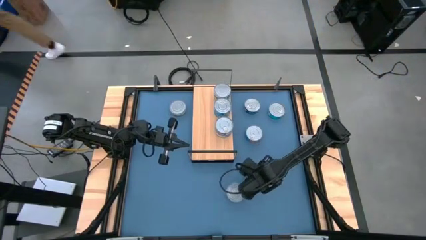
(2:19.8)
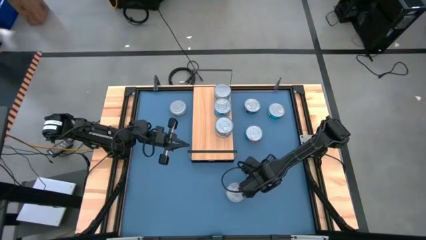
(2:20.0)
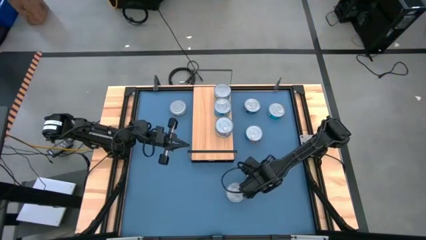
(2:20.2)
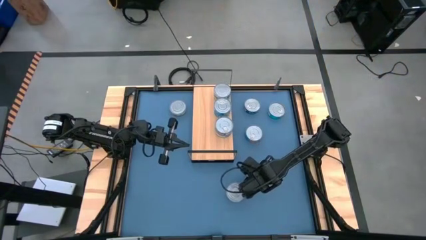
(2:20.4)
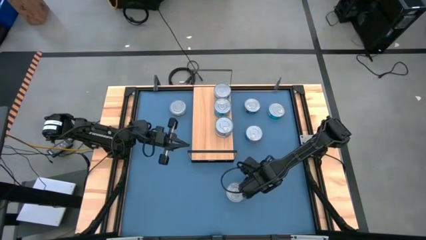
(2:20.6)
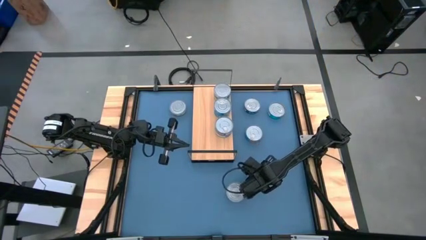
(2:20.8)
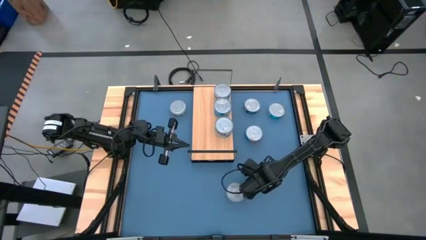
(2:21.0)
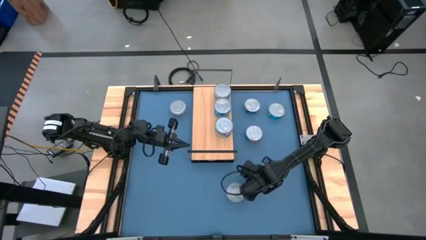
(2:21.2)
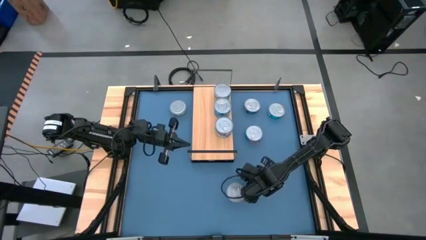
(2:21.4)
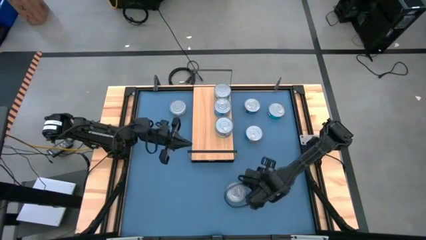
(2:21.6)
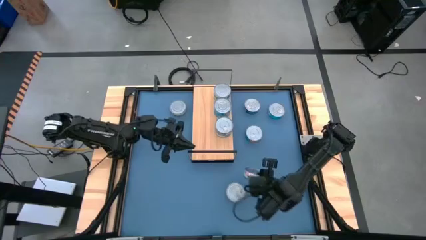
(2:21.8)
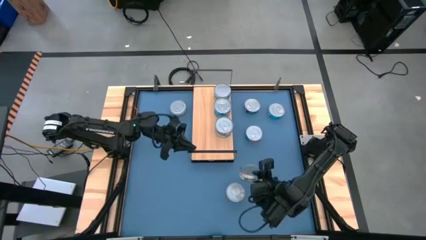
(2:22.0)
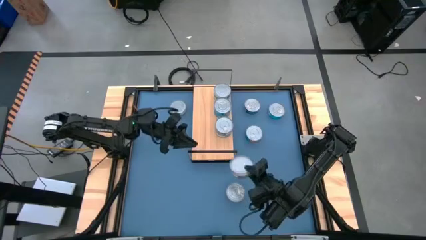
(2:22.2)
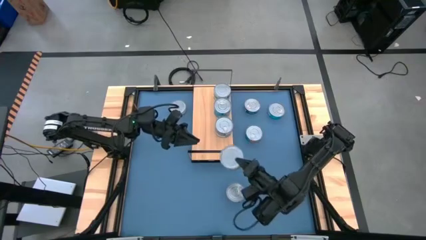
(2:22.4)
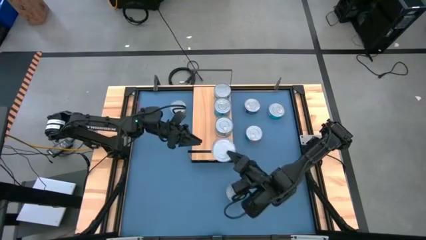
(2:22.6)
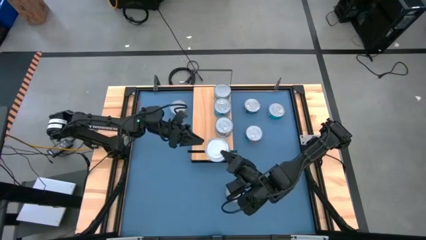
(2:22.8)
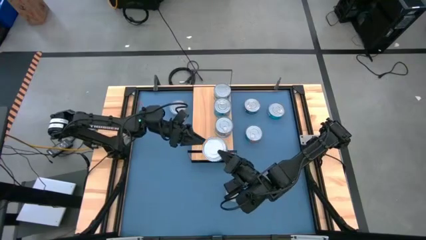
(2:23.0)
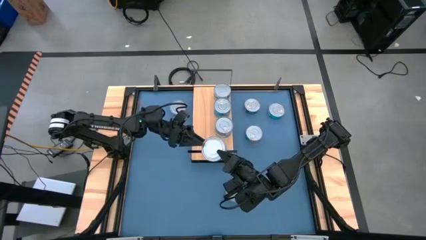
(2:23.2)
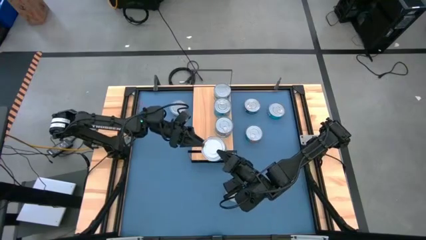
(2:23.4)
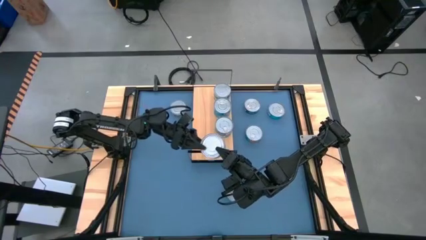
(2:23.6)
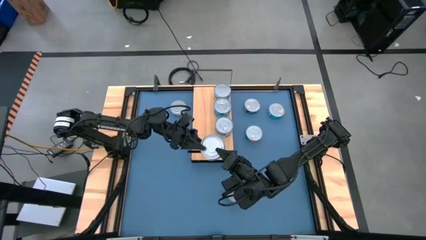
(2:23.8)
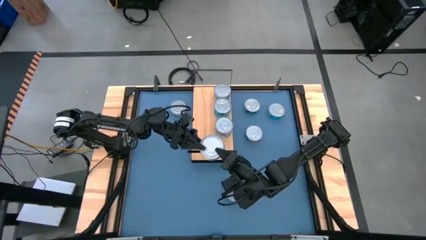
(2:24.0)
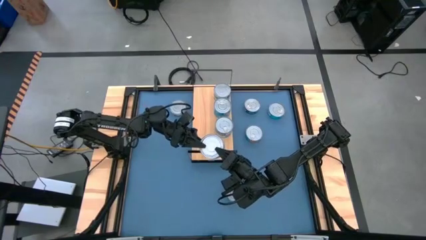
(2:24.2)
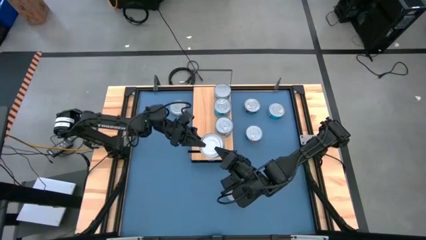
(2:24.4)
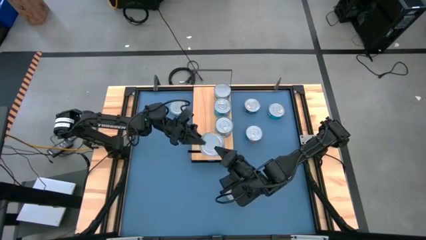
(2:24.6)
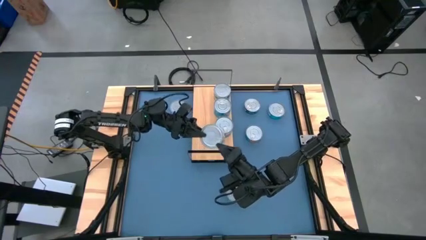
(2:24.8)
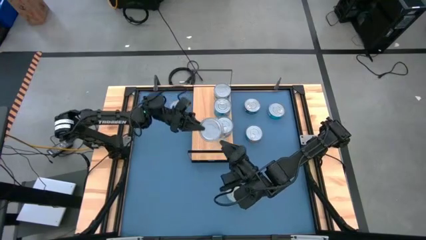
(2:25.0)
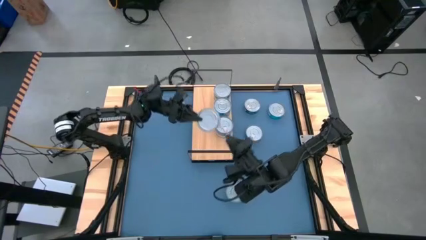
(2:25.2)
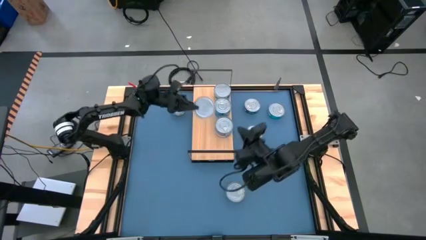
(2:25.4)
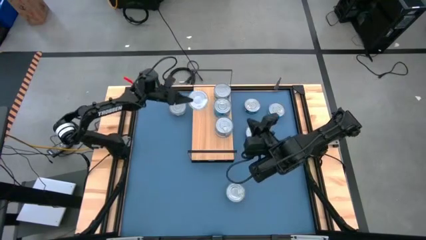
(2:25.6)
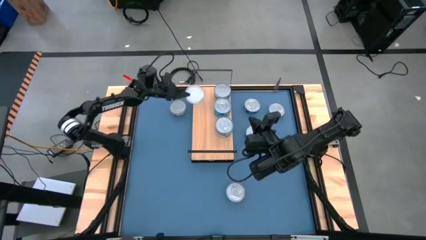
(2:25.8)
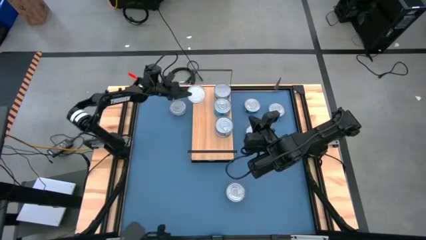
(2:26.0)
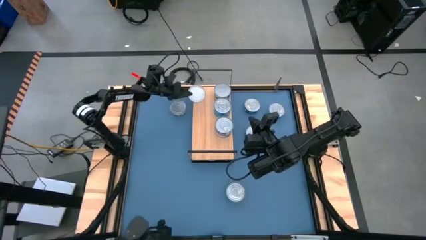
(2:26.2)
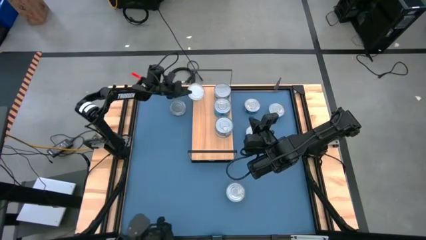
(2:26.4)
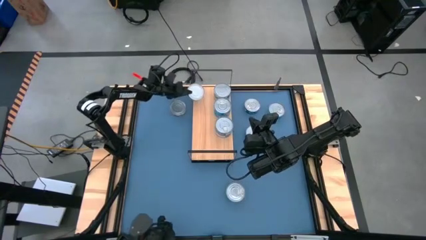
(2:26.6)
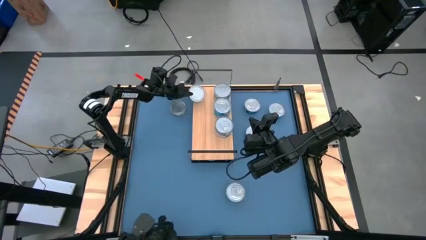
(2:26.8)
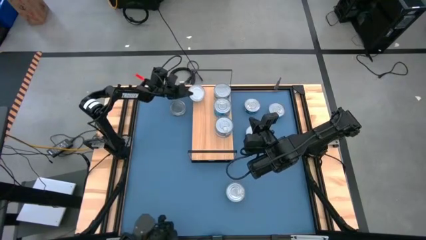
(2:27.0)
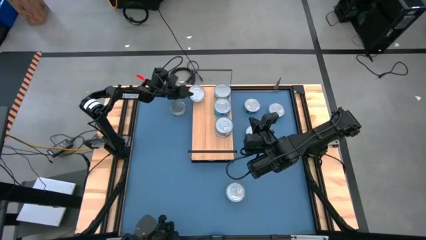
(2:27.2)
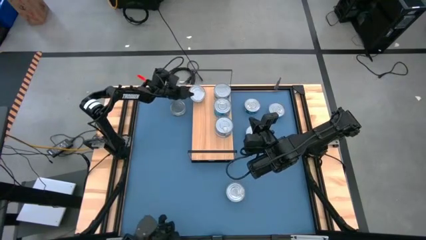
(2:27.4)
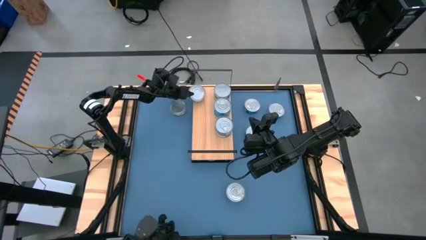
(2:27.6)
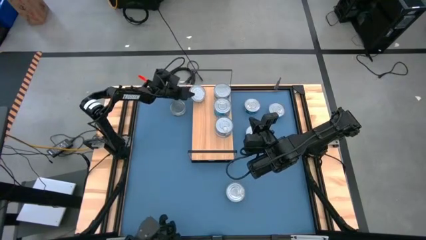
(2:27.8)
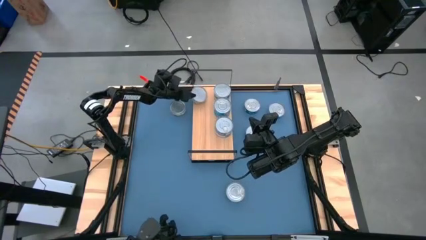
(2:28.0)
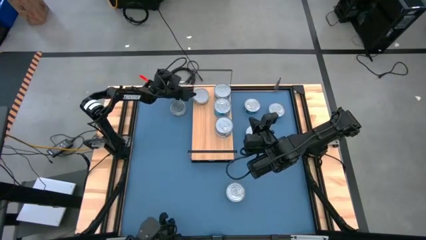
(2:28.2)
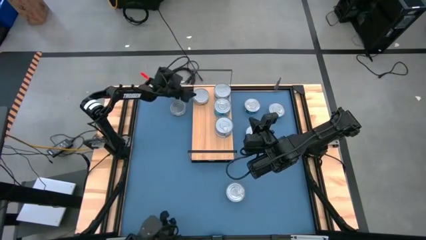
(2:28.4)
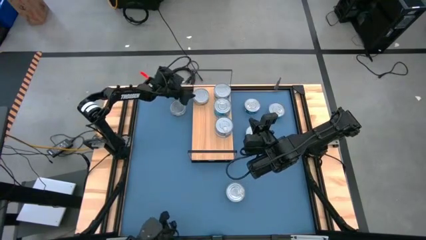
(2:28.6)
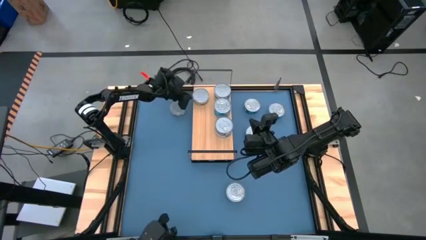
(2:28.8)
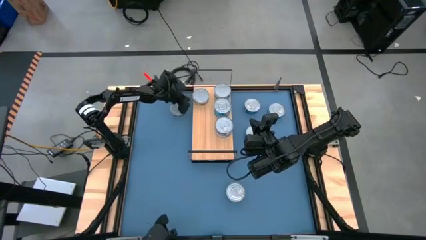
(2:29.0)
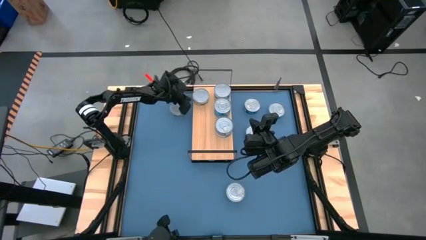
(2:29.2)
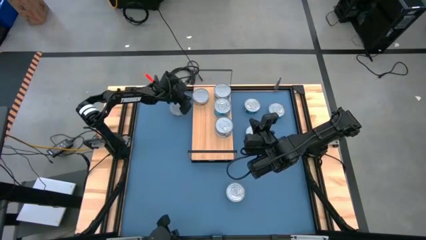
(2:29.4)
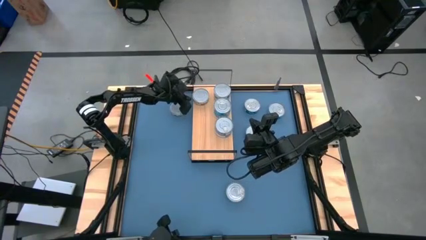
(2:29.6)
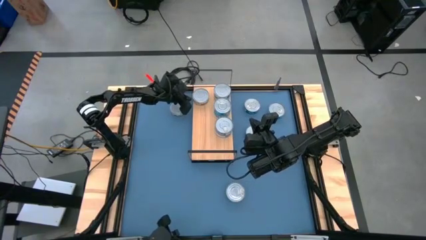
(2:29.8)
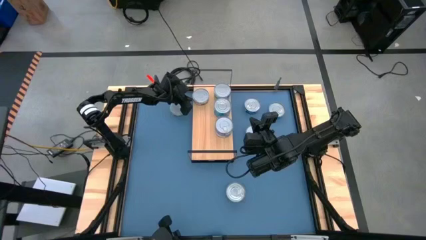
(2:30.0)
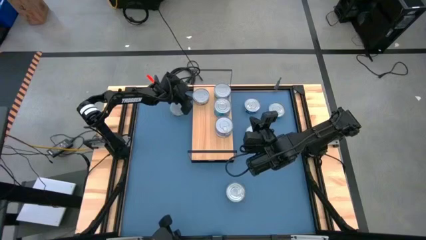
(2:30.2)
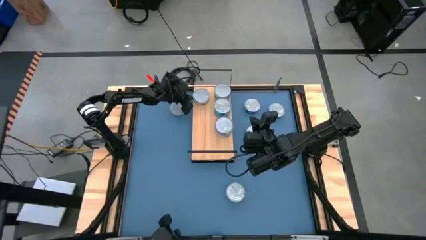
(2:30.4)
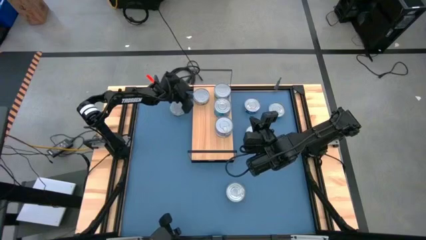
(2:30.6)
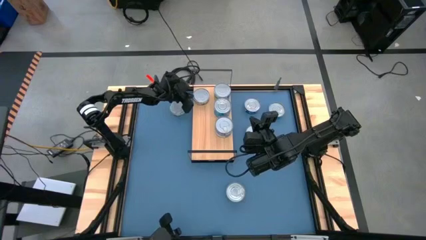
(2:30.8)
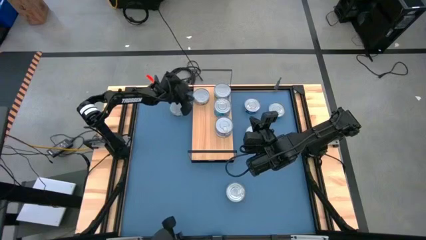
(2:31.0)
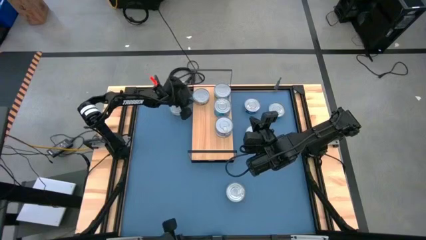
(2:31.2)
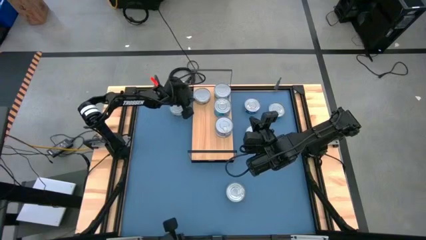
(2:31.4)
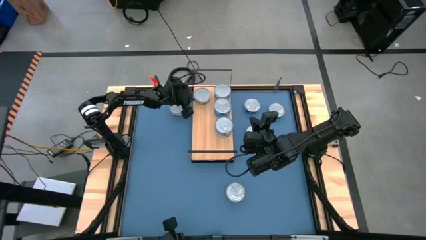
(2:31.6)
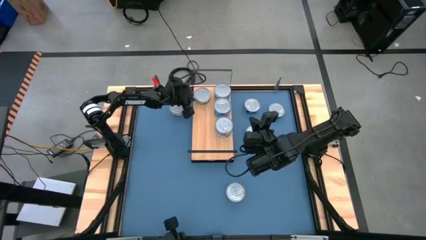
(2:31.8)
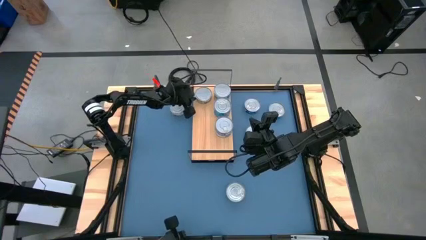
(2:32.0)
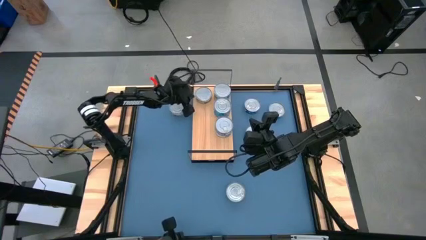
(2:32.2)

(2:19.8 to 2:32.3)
Task: Stack canned seafood by type on shelf
Put the green tuna can on the shelf aligned with the other green tuna can

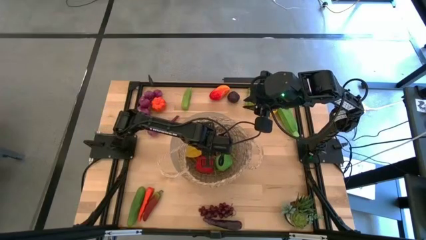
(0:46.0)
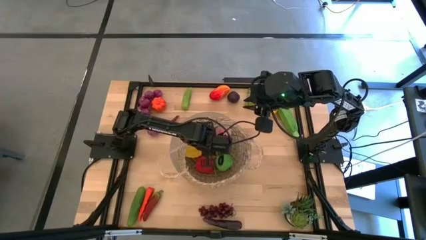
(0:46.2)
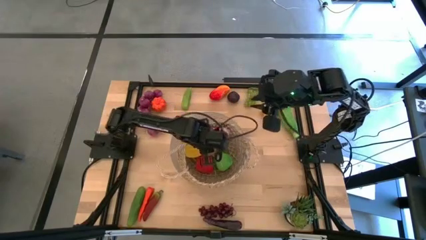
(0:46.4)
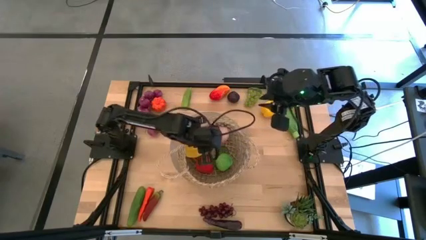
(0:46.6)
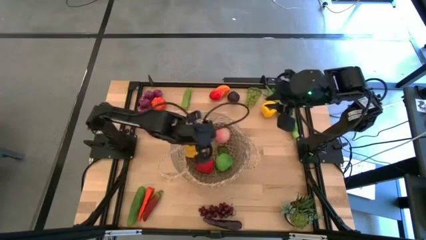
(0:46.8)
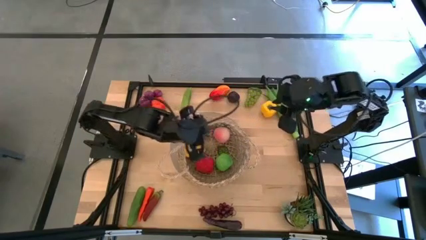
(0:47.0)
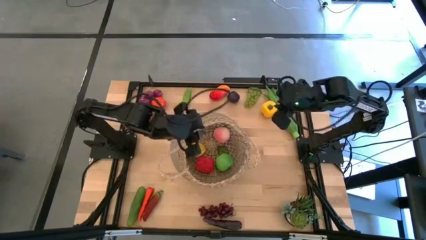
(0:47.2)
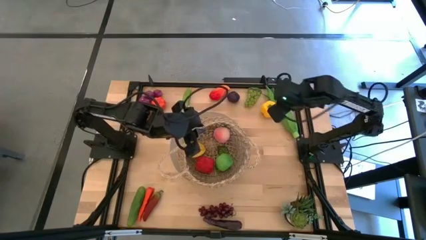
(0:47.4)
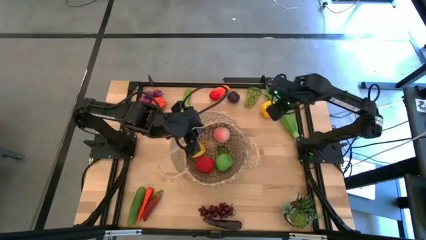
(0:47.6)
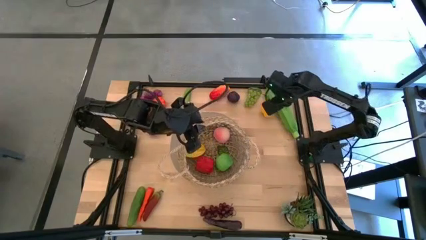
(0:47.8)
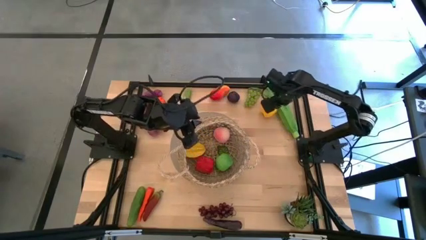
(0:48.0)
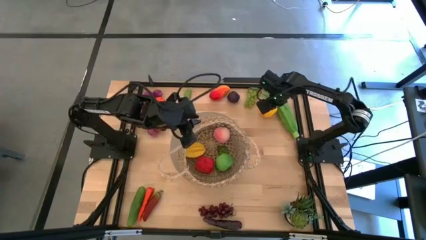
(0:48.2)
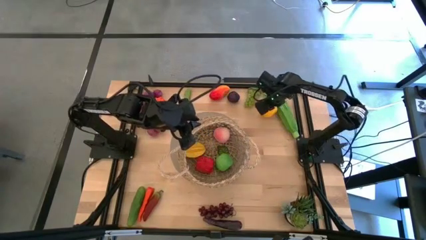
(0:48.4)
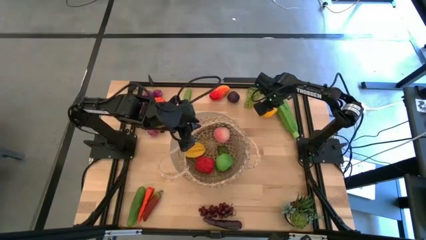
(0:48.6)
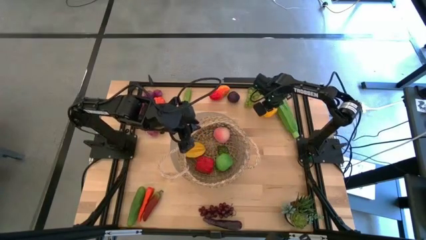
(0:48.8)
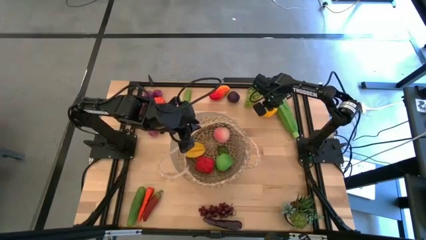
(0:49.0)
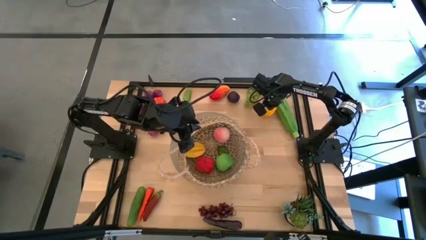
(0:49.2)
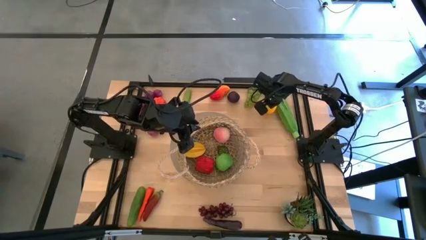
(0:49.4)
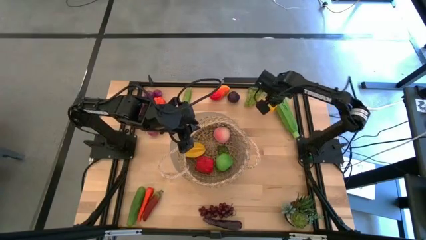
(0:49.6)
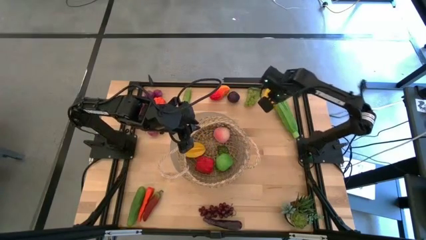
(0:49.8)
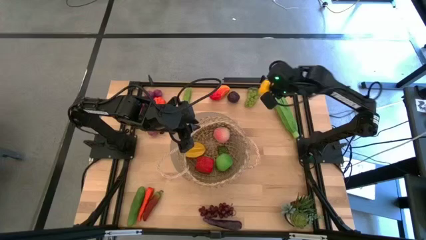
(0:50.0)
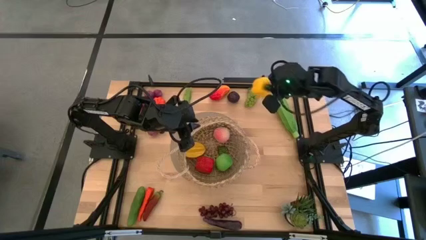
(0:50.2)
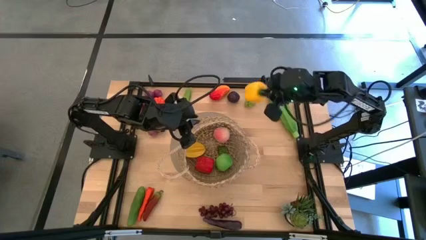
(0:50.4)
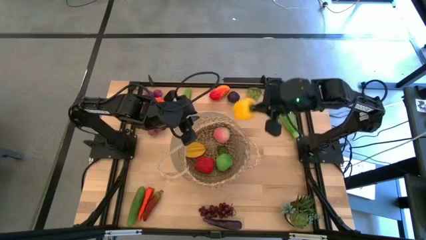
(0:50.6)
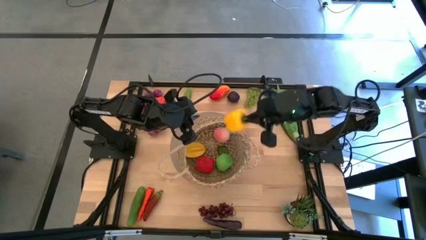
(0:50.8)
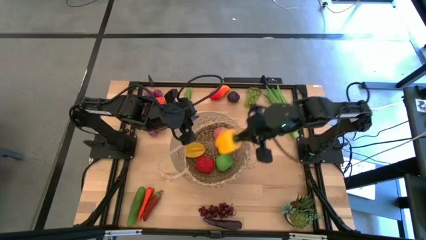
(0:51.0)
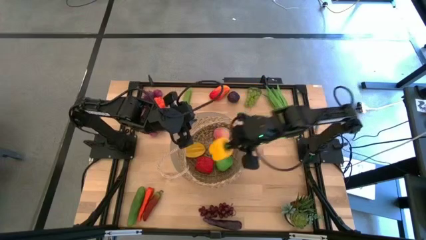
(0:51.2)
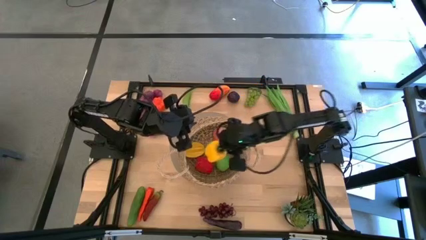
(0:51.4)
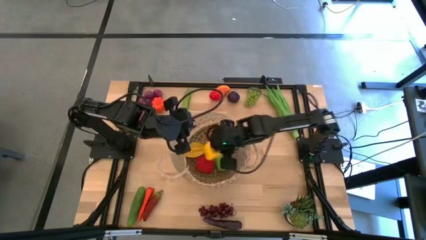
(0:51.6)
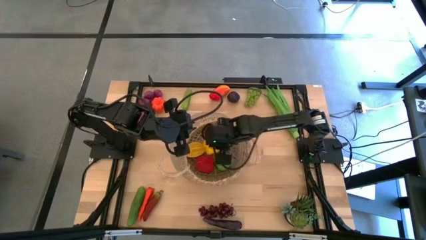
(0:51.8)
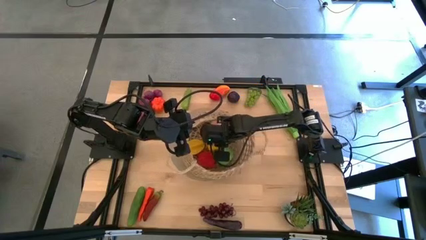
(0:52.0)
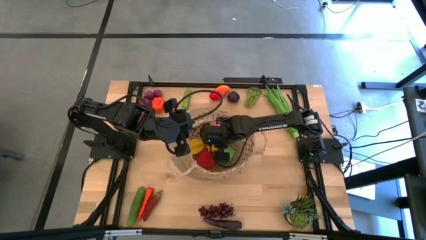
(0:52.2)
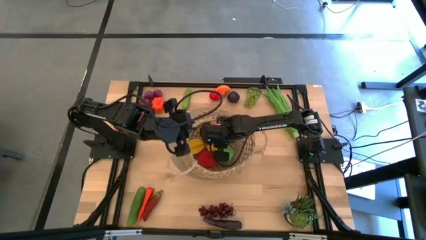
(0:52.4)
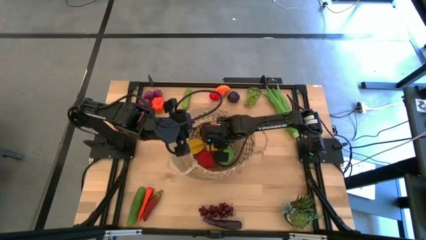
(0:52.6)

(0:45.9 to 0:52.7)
Task: Build produce basket
Put the yellow bell pepper into the brown basket
